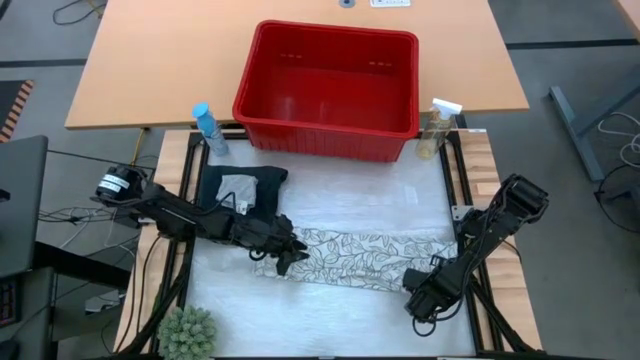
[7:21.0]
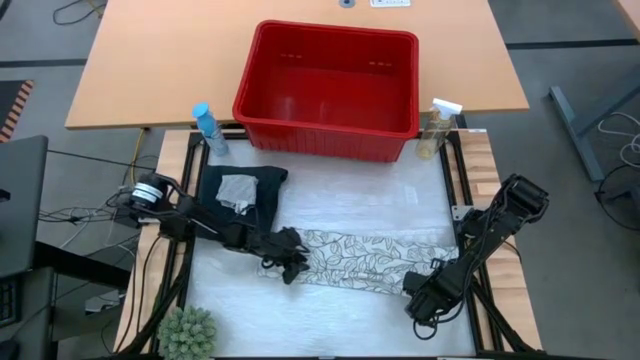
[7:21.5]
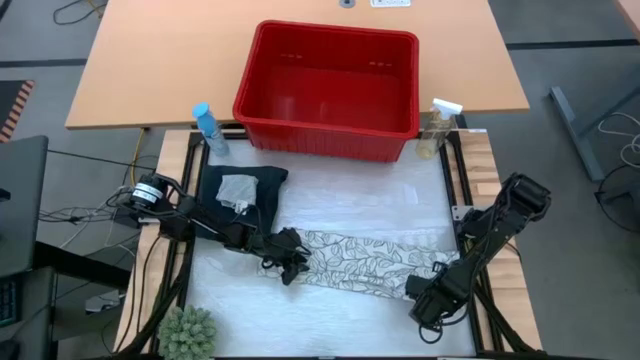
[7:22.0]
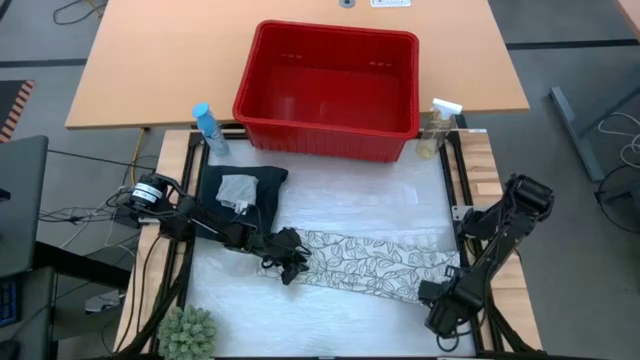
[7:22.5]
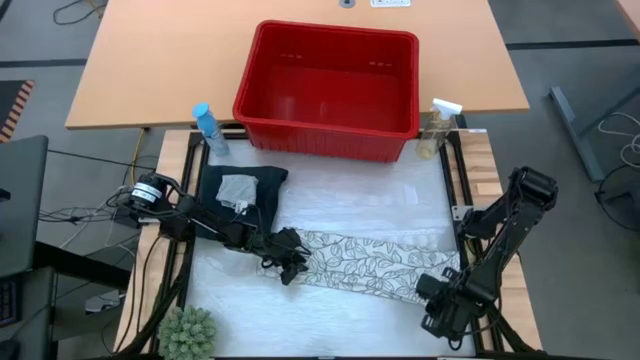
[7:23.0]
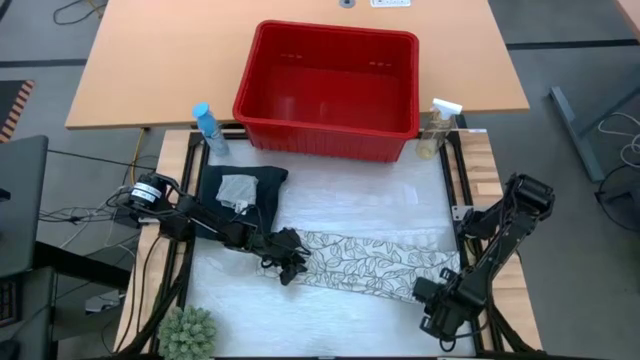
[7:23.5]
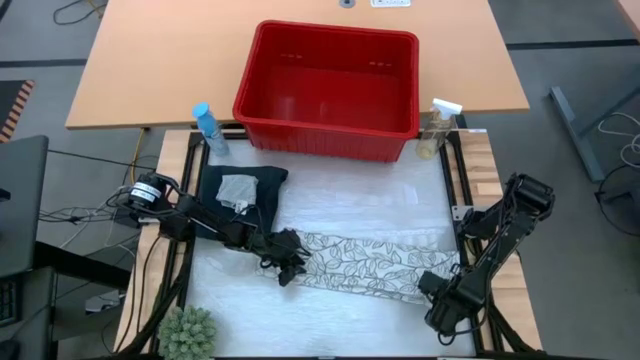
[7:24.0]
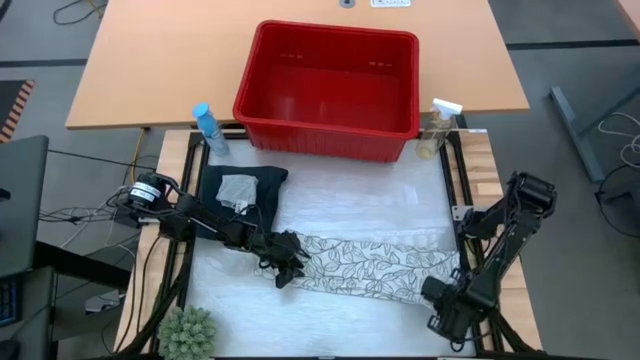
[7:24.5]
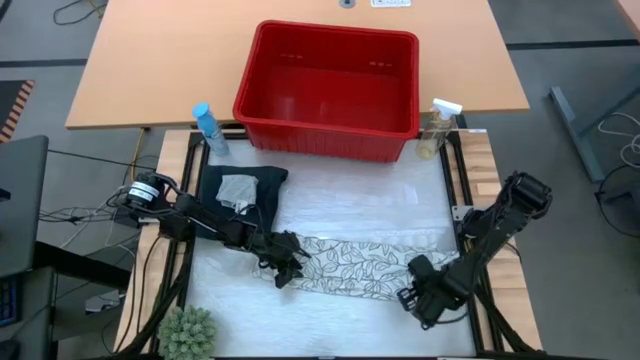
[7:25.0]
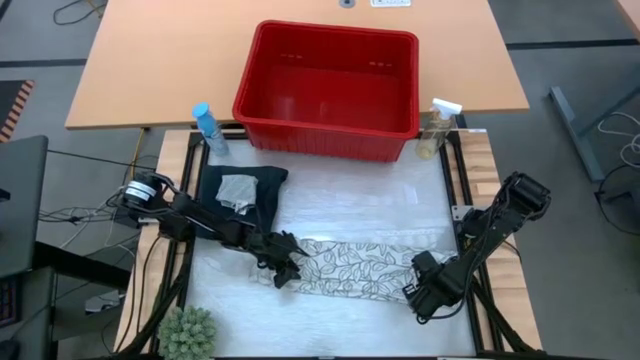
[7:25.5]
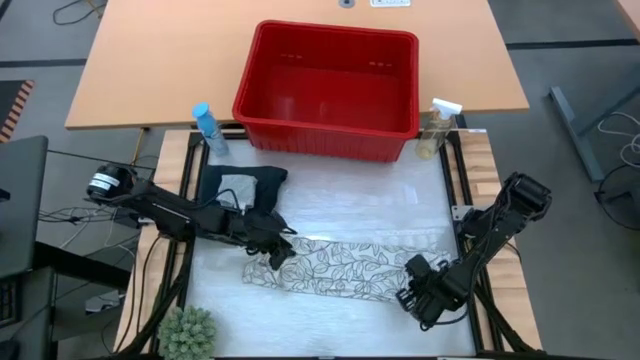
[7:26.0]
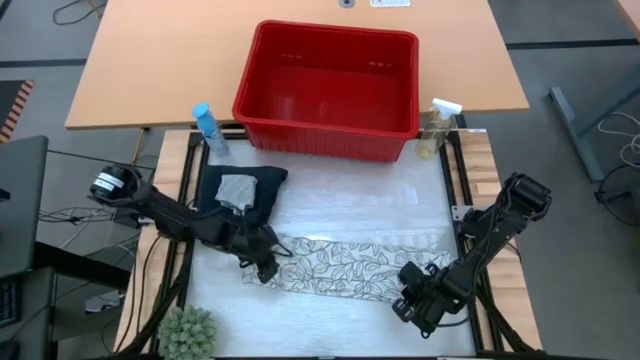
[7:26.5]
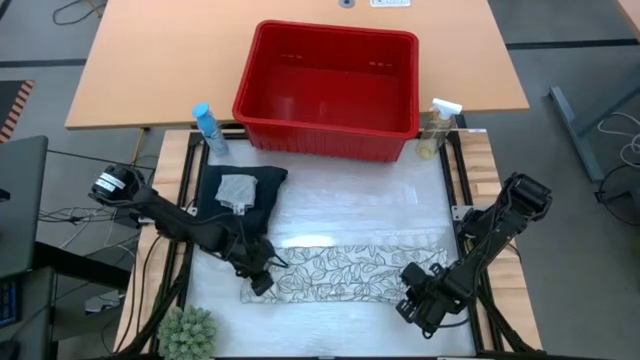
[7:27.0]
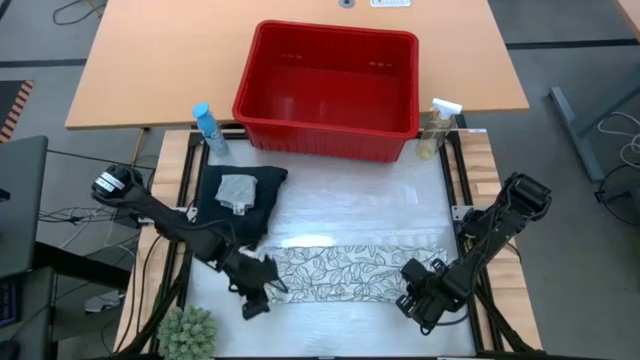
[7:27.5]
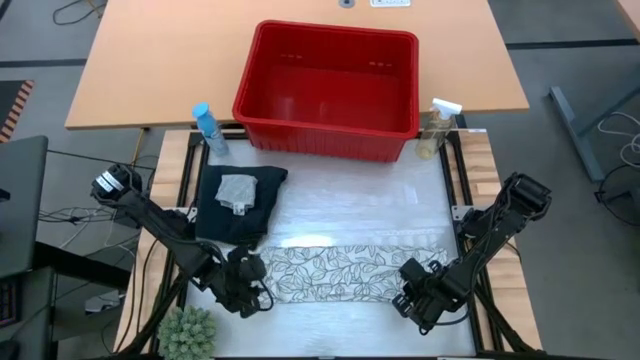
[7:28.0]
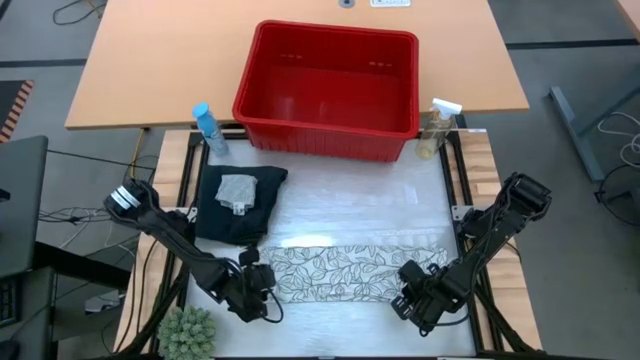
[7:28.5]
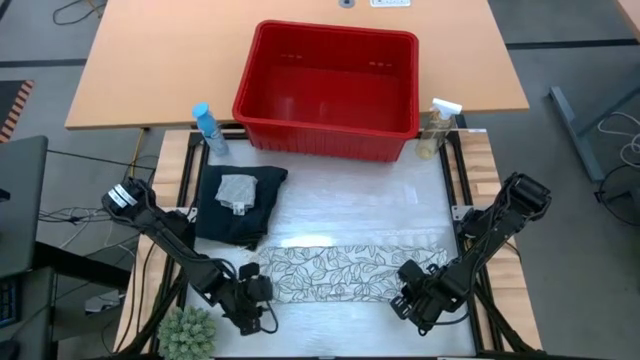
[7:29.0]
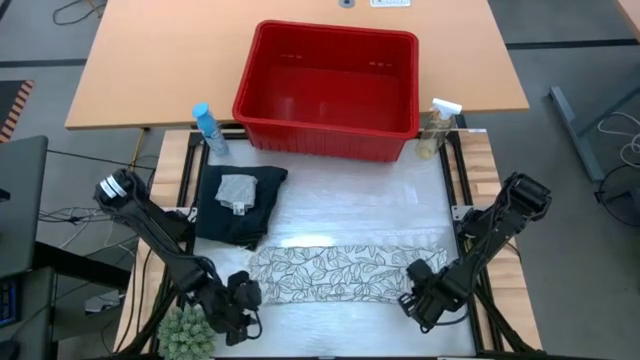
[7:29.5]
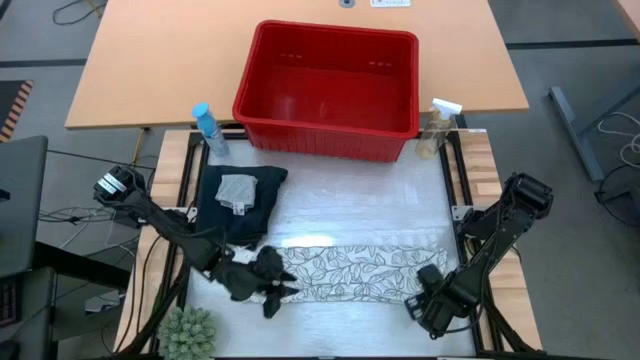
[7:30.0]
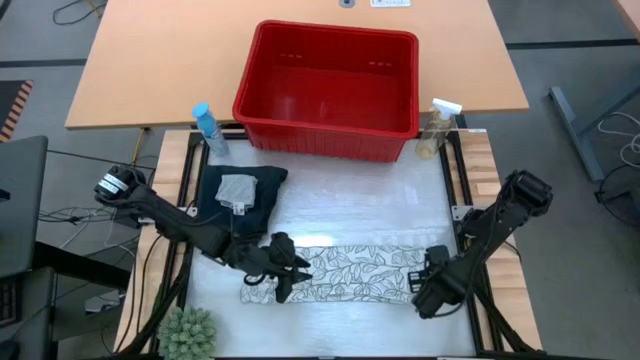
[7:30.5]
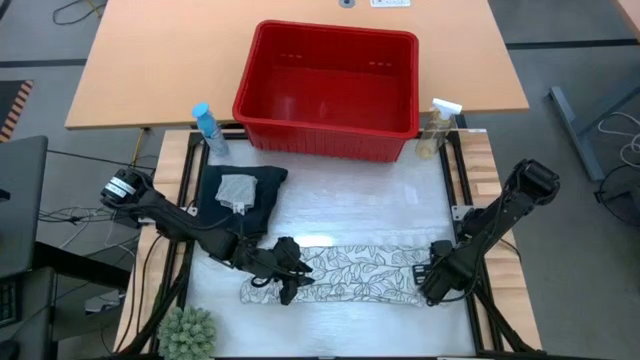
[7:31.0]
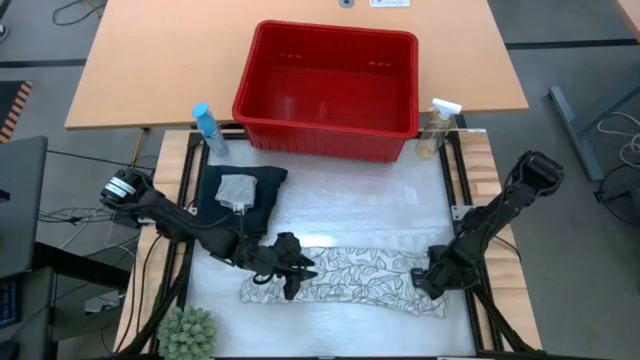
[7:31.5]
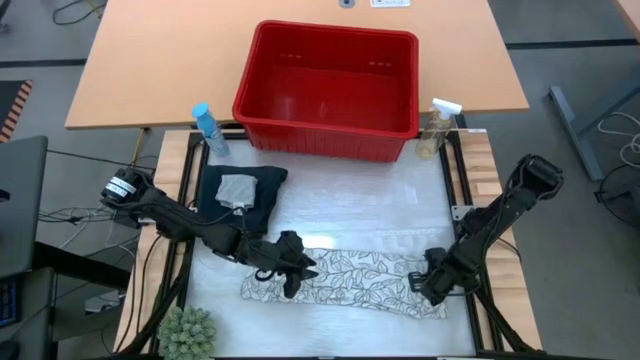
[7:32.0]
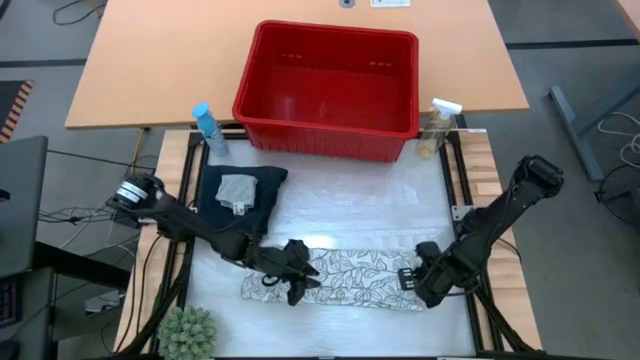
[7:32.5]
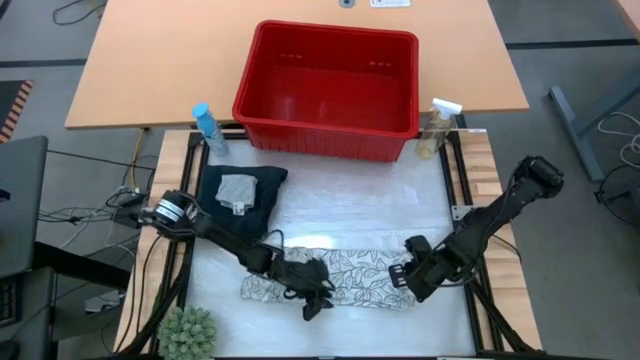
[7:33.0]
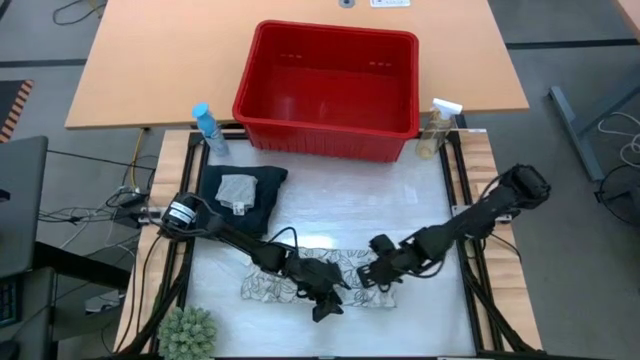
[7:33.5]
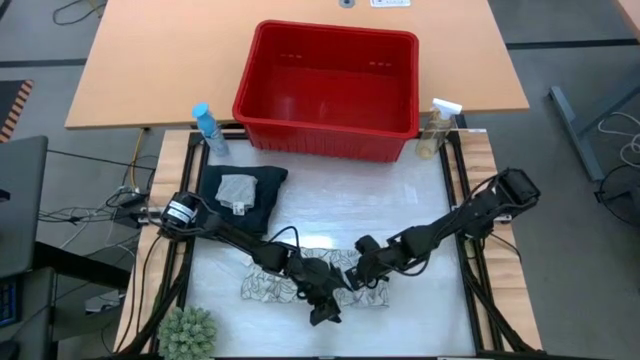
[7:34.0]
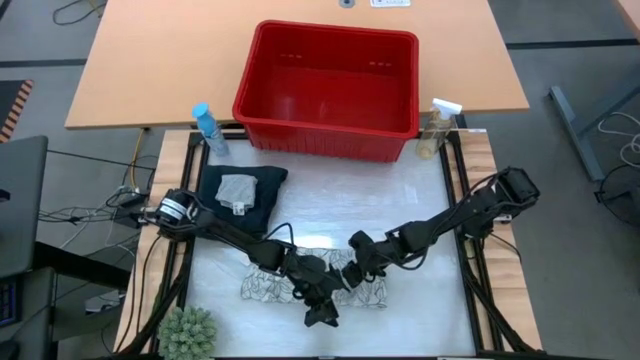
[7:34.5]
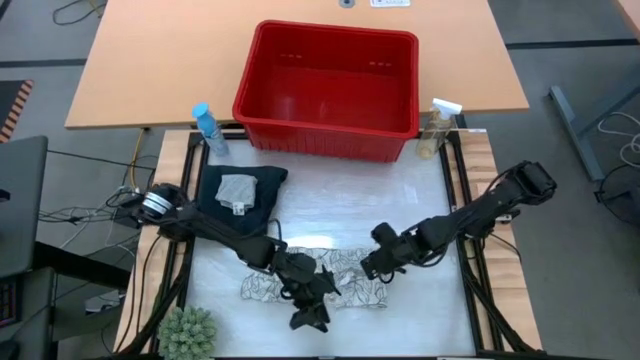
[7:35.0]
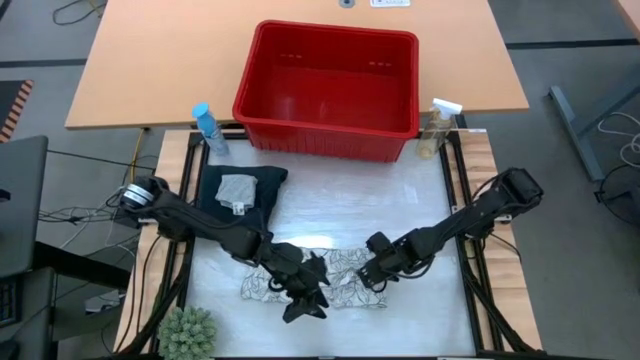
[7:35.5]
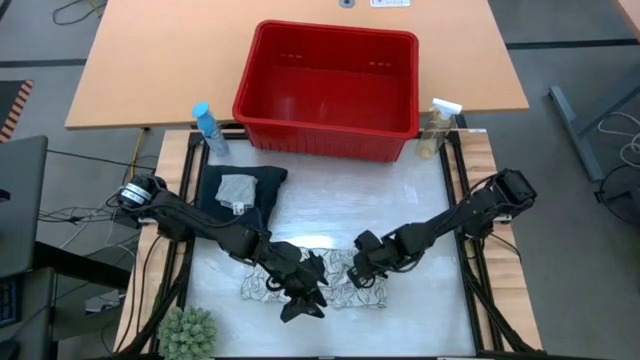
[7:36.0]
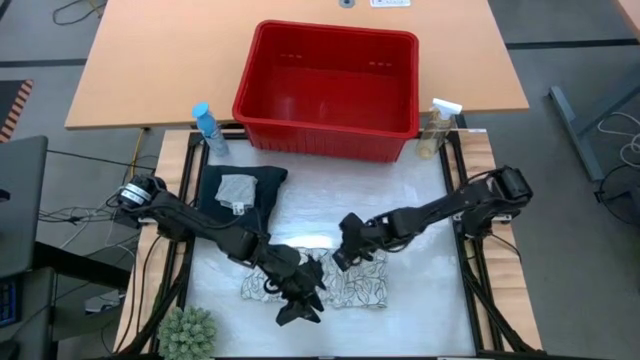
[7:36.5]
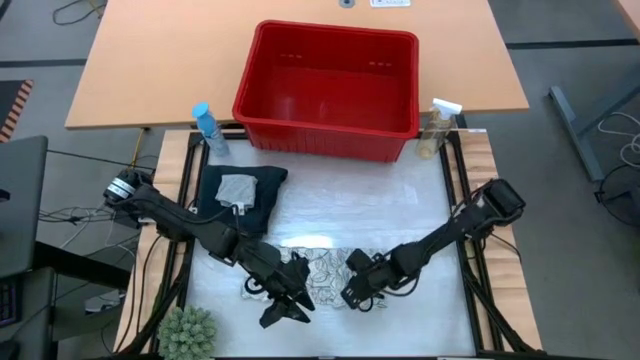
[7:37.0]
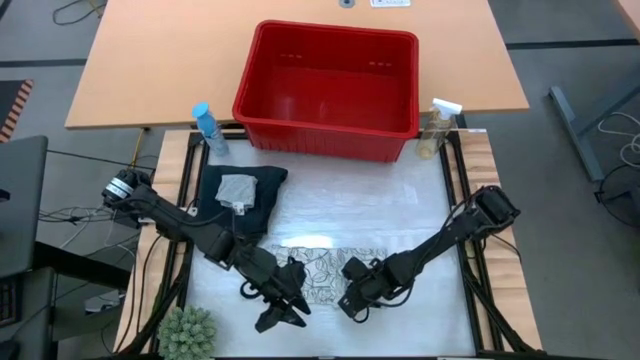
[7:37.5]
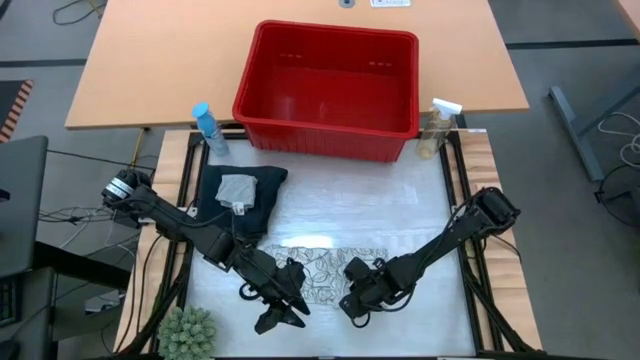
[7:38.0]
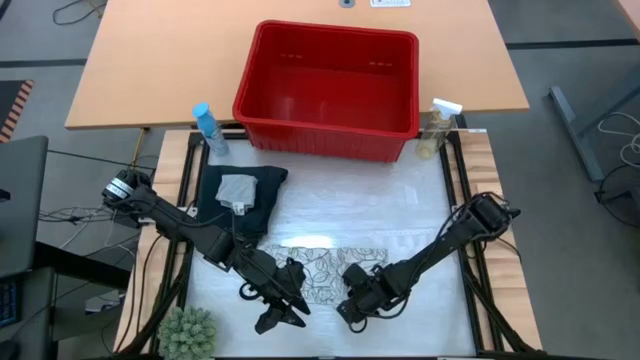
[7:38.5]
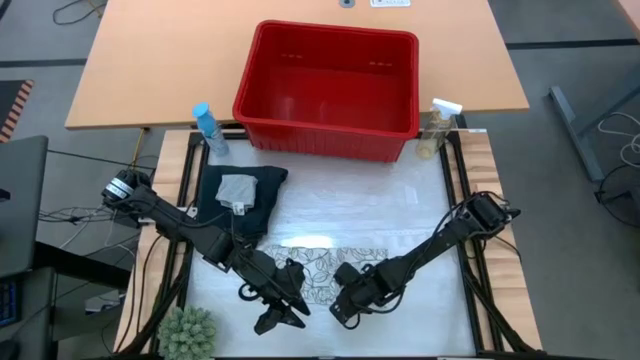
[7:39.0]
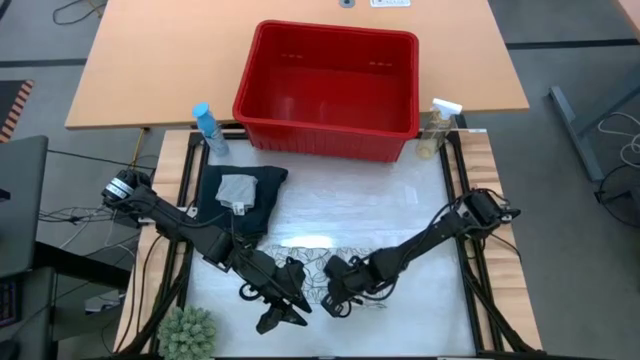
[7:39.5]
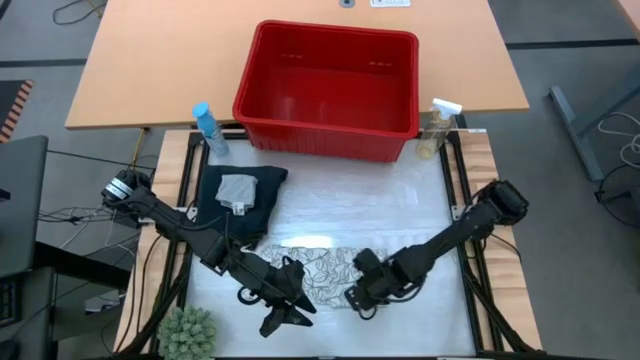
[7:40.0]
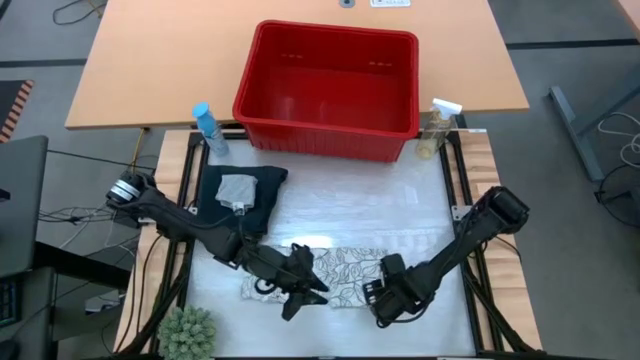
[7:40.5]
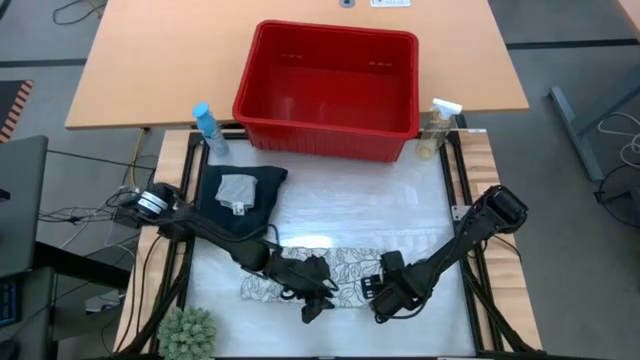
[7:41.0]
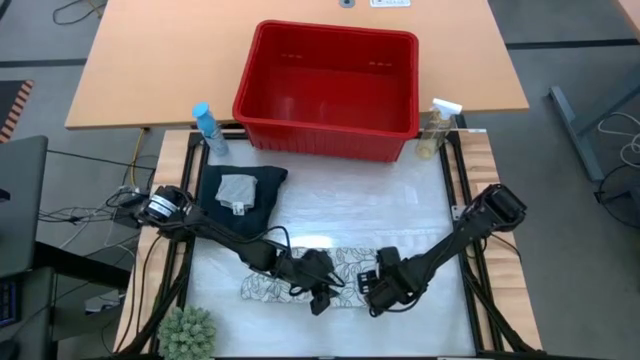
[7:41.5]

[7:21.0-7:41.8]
Task: Fold Laundry from Bin
Fold the white patterned shirt
